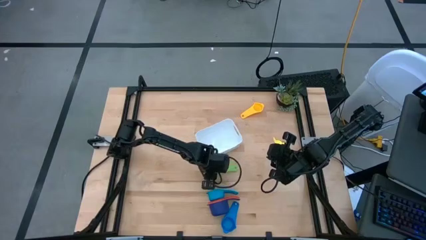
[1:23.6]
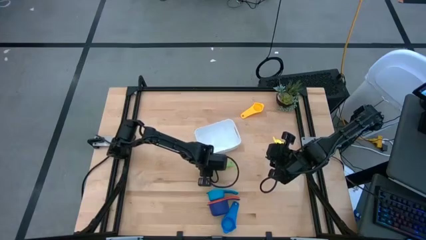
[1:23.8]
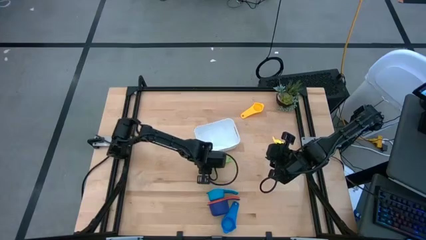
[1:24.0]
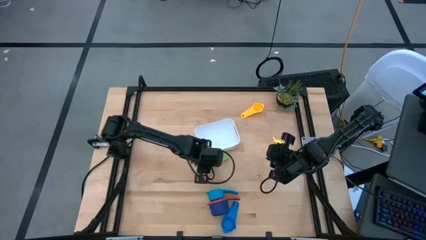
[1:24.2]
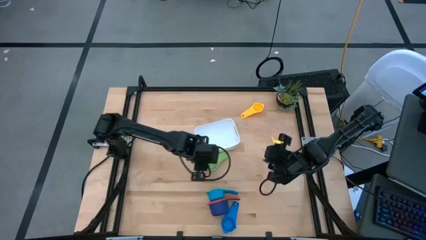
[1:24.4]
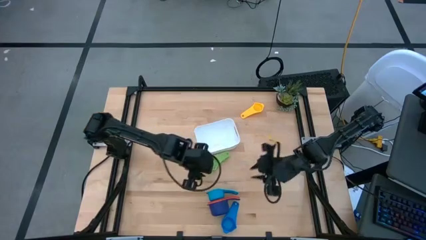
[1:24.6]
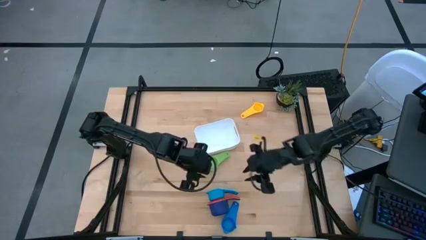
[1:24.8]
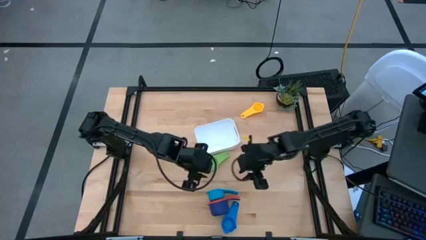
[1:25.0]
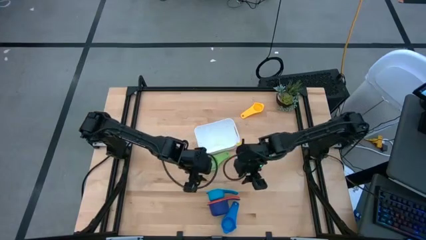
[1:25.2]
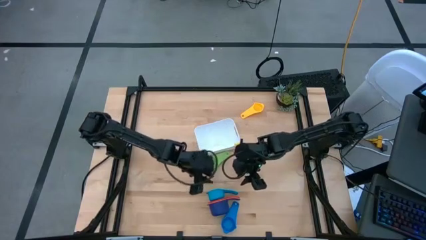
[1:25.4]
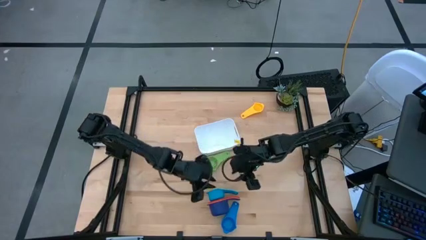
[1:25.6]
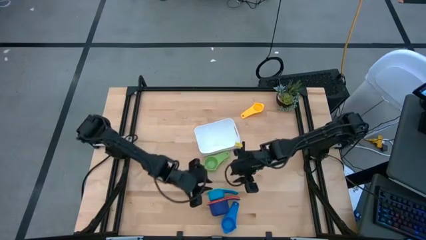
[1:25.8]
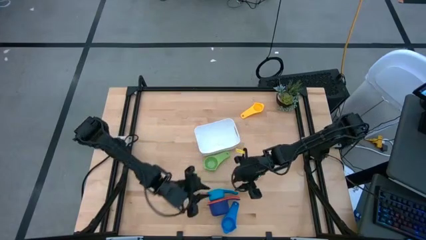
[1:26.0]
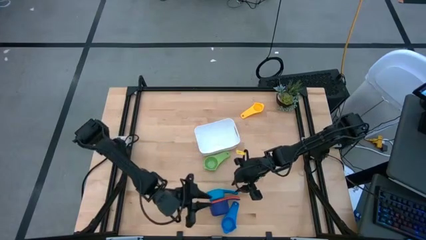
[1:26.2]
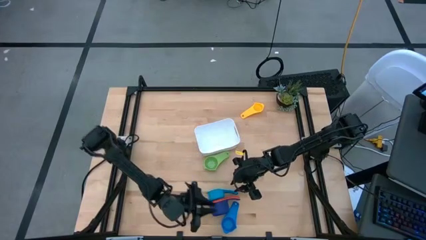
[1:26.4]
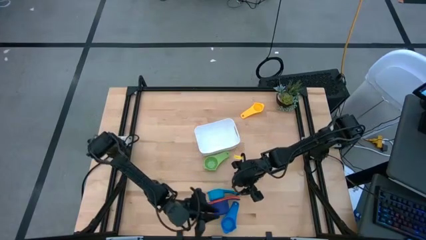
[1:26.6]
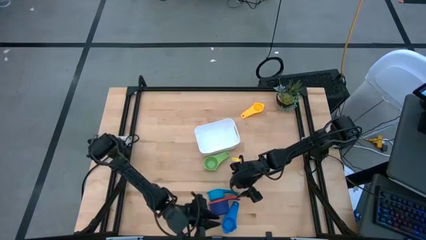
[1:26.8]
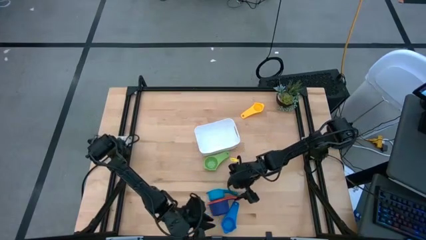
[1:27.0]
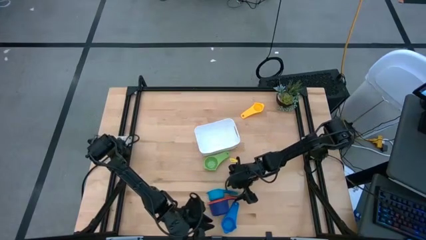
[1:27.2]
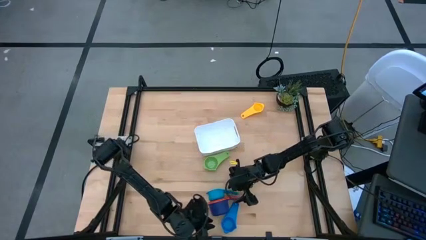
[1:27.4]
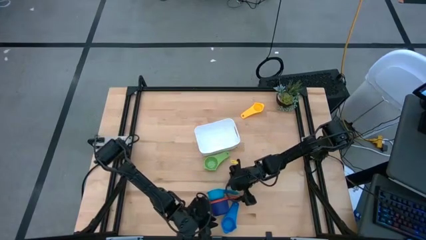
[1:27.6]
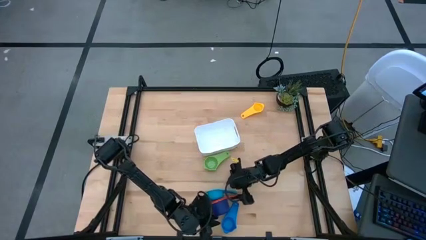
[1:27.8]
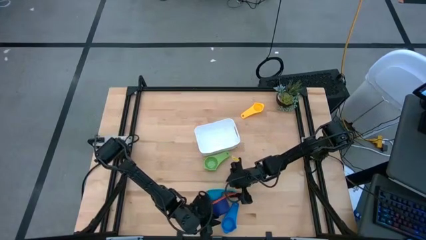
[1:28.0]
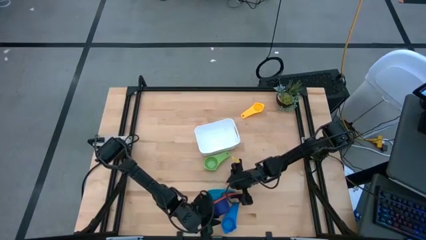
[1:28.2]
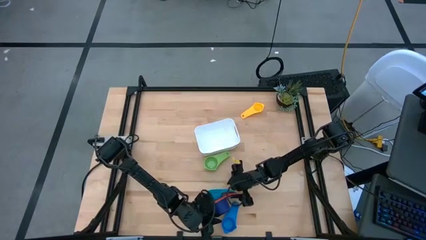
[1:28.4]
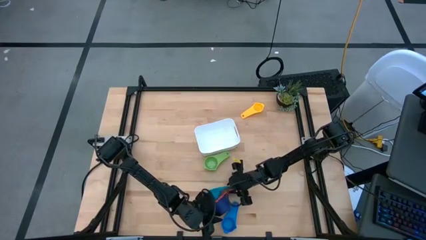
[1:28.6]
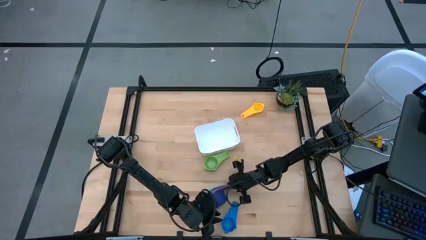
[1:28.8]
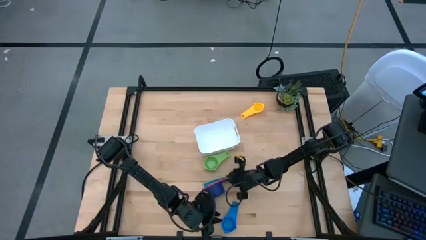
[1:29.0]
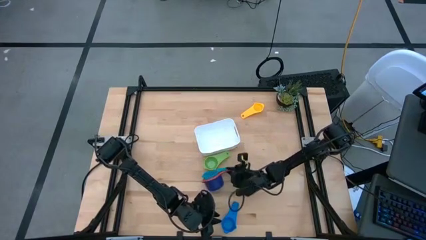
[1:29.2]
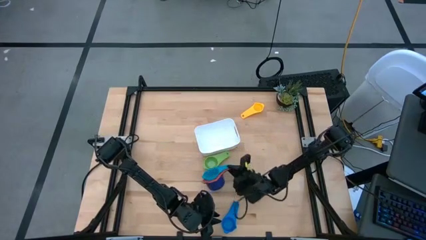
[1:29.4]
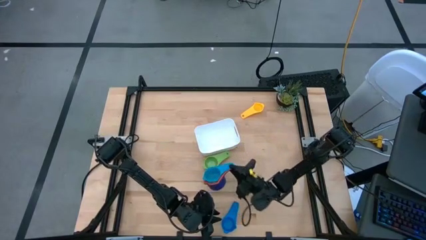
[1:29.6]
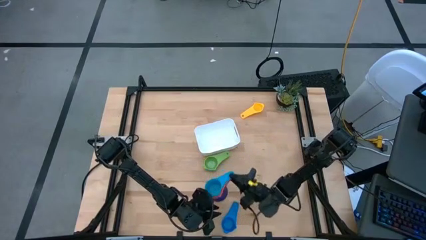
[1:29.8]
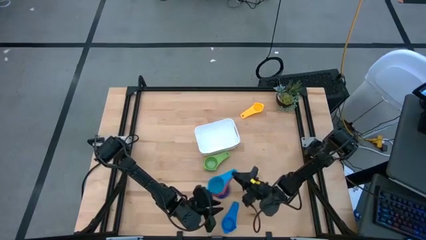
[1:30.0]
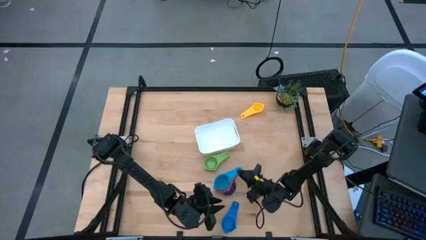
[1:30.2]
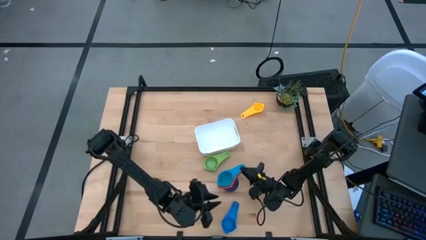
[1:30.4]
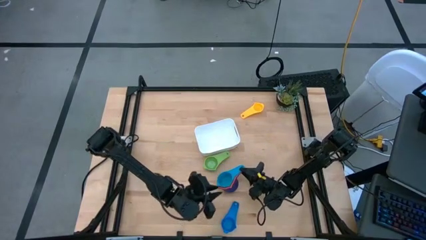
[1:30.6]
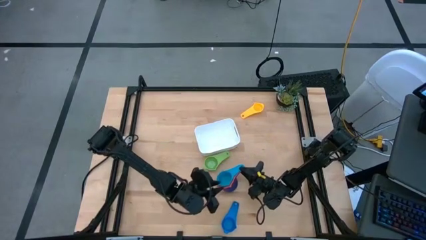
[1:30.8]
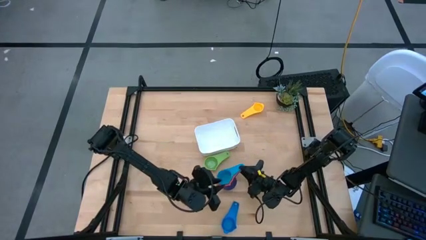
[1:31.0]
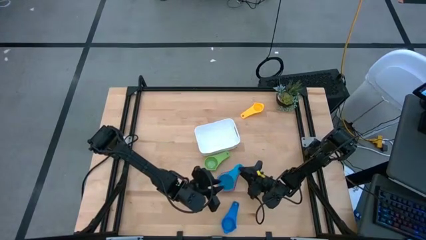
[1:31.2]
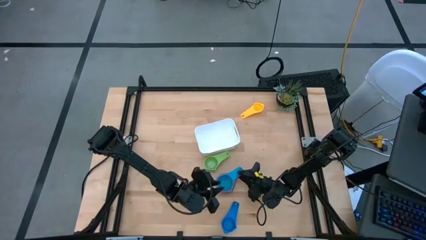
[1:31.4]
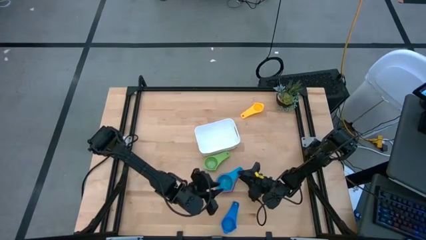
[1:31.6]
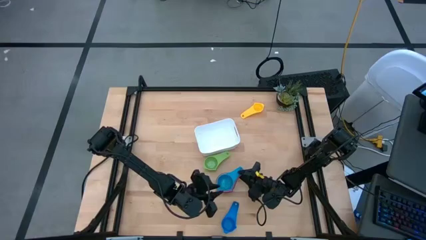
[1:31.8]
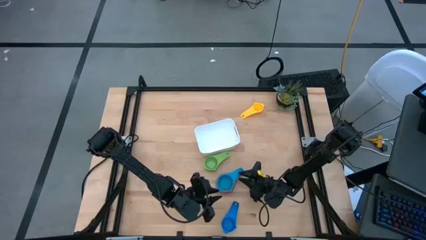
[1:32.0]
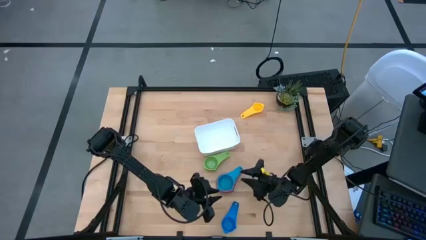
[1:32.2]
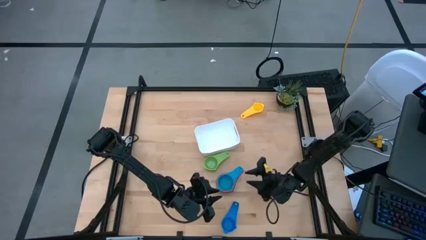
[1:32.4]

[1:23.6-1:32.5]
Task: Nest measuring cups in basket
Adjust stacked measuring cups

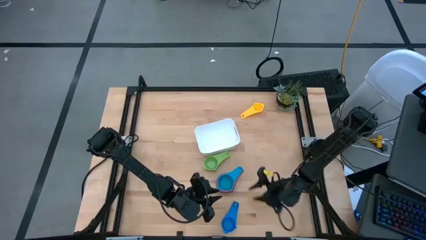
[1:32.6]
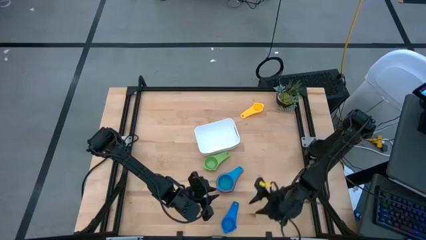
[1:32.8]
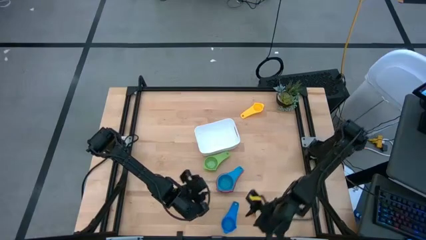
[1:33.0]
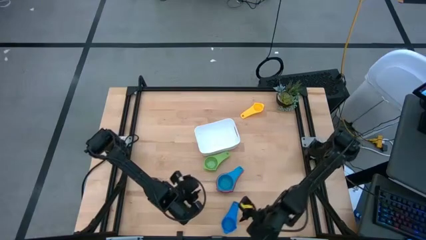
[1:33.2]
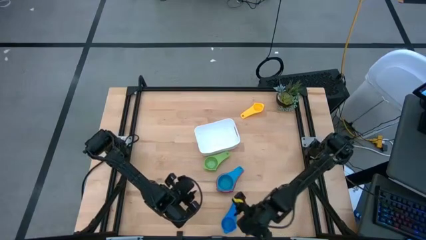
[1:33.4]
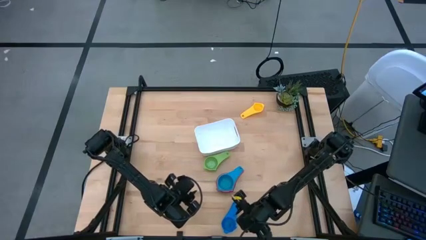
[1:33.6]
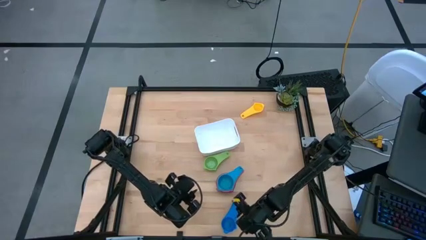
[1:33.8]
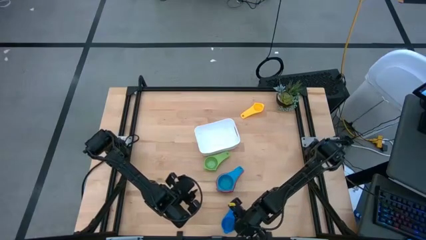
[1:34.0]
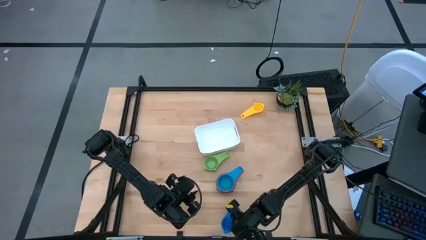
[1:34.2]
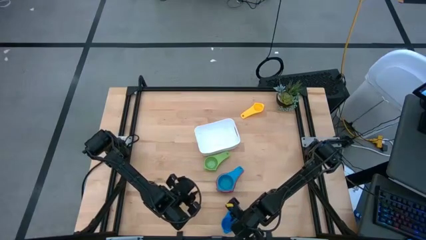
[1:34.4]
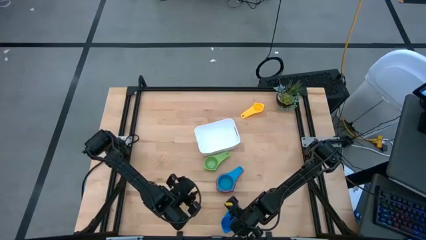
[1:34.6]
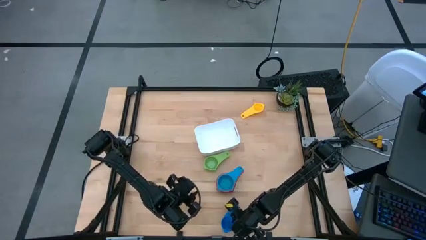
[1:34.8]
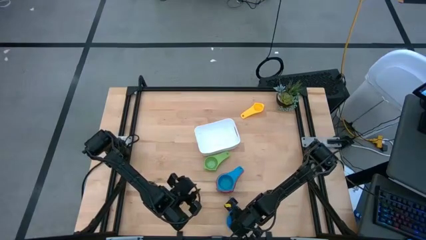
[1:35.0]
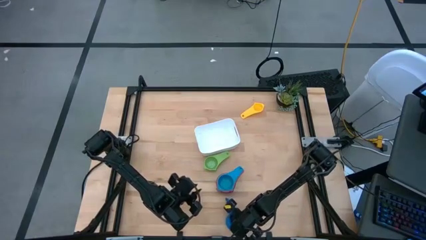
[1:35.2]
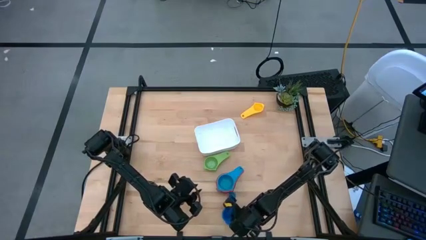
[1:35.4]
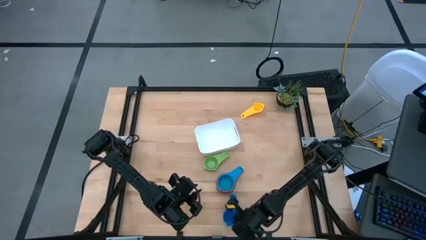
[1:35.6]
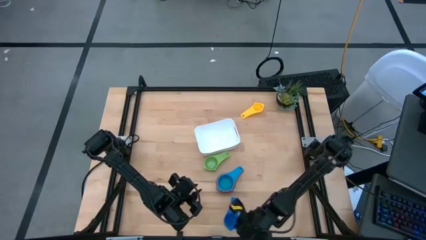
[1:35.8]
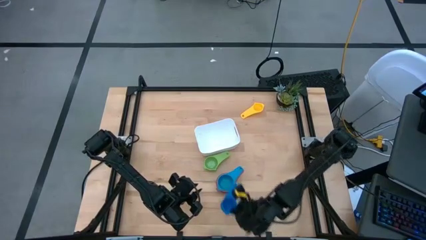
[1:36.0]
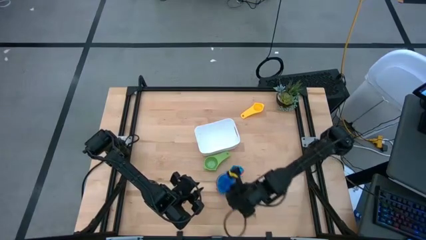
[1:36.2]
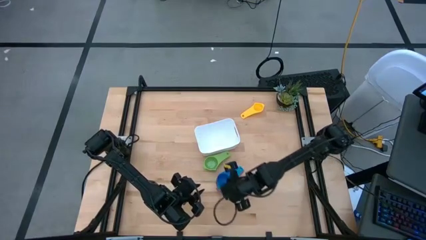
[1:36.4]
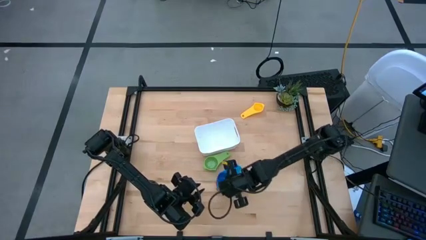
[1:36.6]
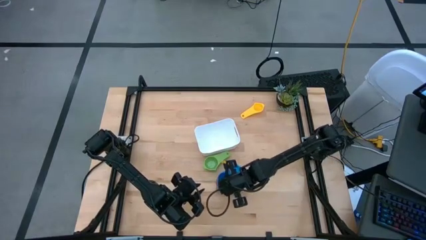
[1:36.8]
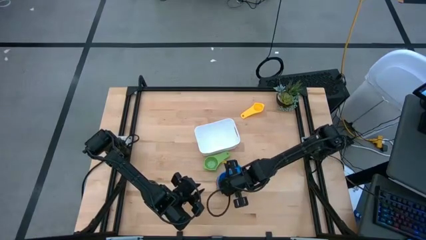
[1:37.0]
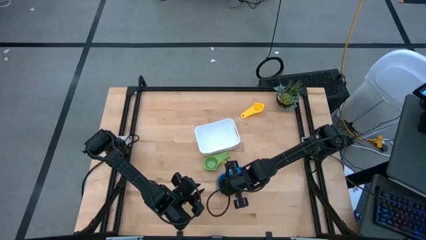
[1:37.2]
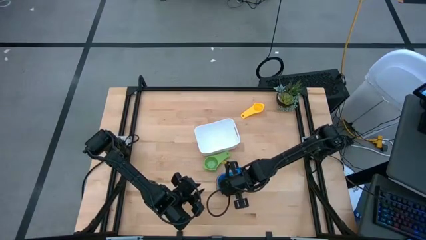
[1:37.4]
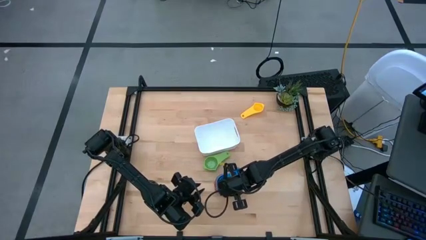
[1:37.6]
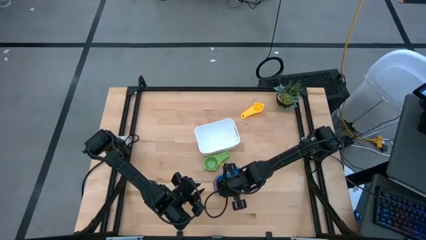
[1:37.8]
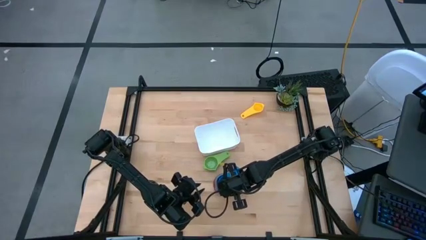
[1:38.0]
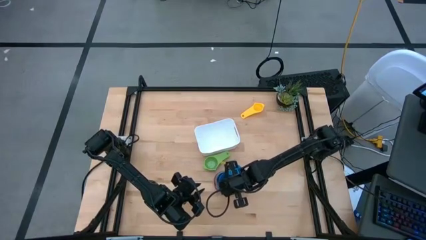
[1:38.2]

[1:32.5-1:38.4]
Stack the blue measuring cup on top of the stacked measuring cups

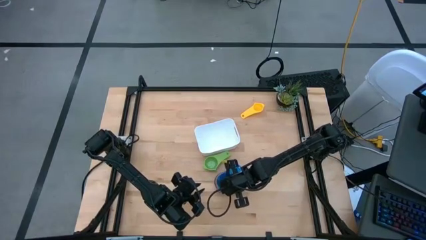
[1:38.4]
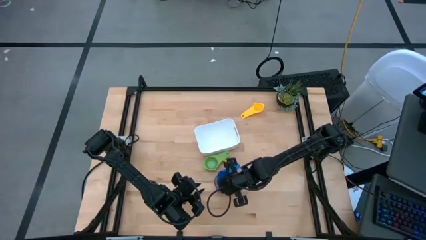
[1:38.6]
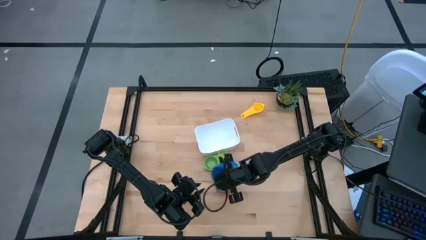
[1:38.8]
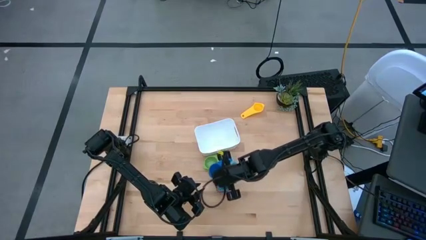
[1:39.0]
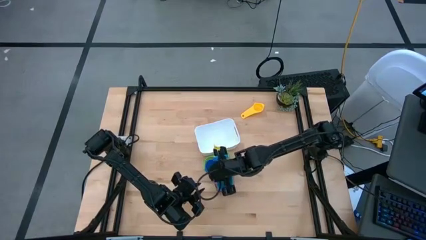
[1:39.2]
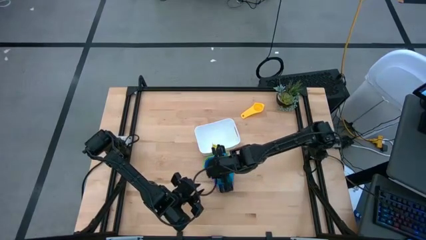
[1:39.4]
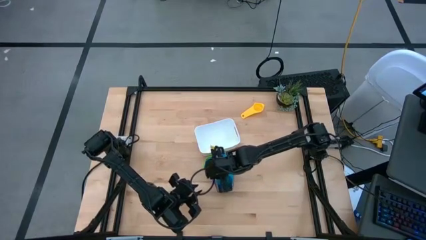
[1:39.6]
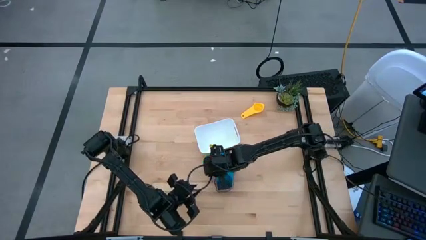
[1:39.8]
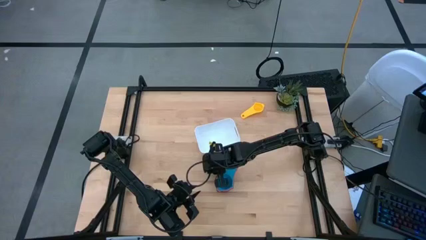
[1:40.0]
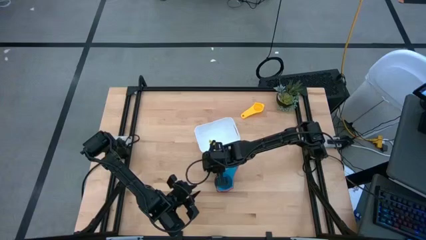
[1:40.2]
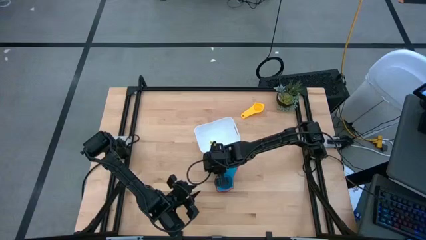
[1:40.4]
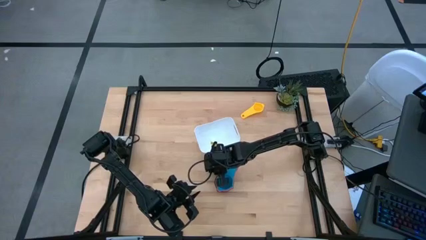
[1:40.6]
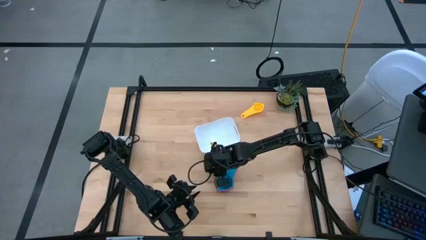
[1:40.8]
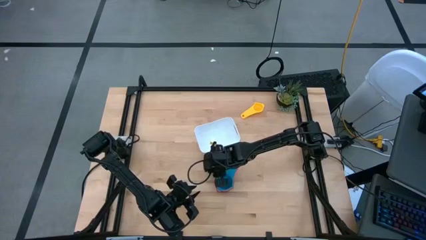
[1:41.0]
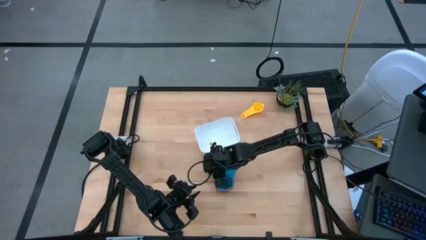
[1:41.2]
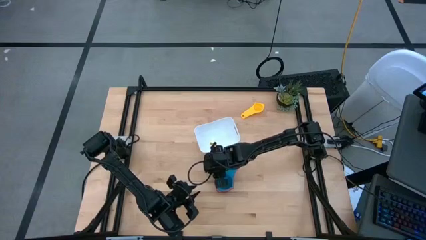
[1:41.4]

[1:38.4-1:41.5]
Stack the blue measuring cup on top of the green measuring cup
